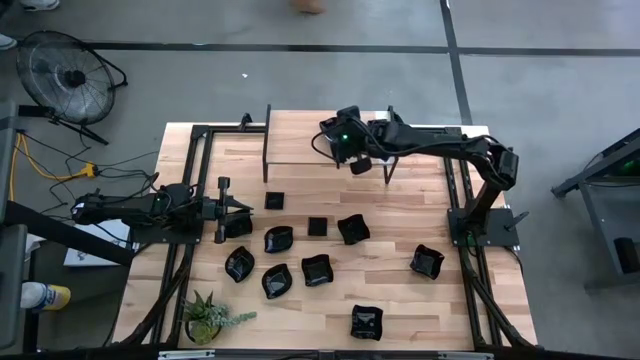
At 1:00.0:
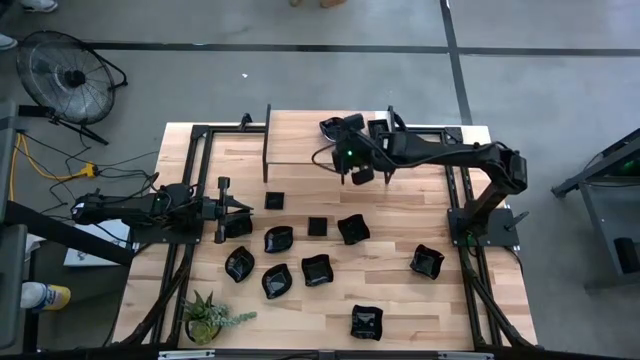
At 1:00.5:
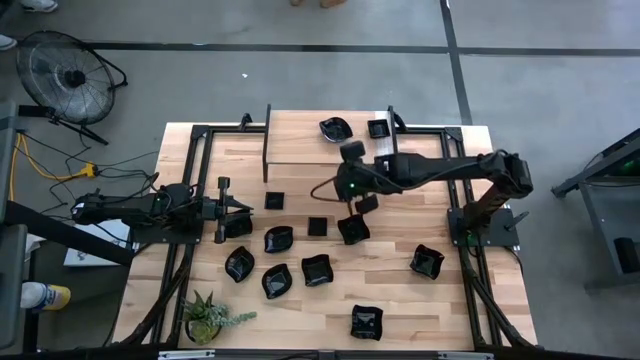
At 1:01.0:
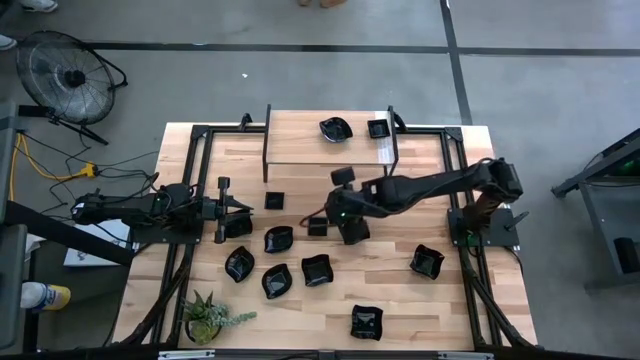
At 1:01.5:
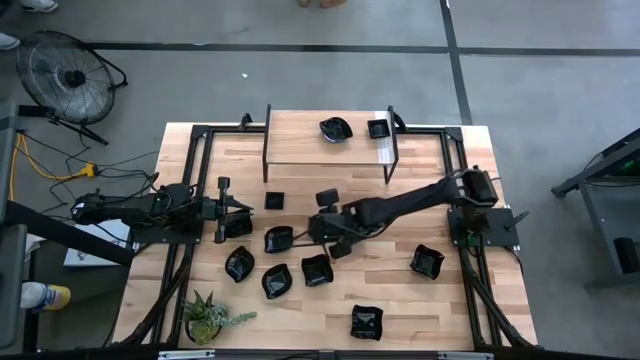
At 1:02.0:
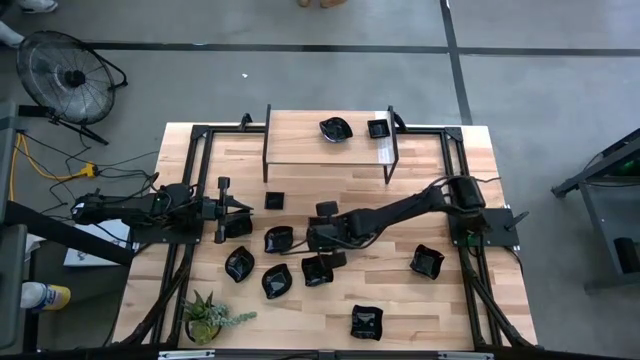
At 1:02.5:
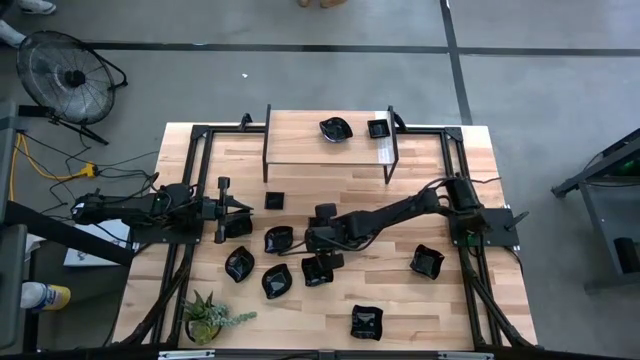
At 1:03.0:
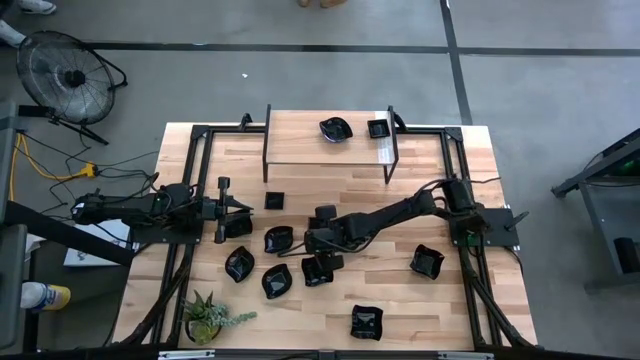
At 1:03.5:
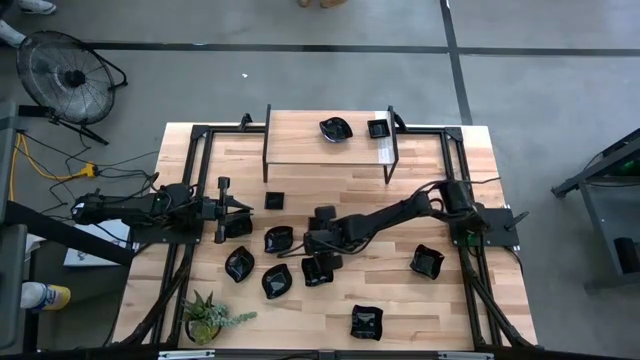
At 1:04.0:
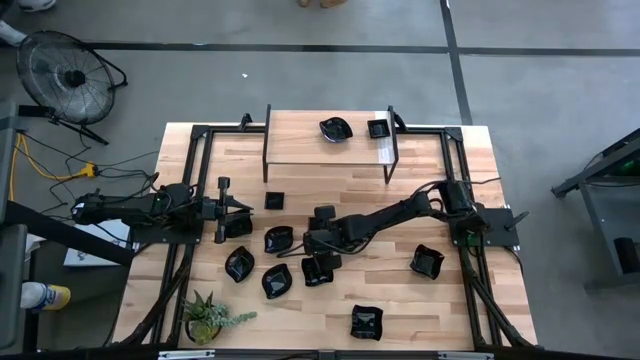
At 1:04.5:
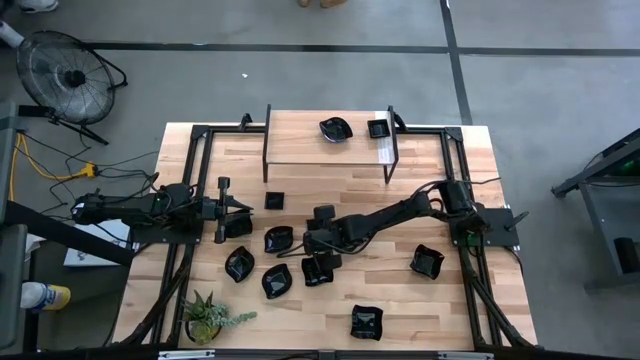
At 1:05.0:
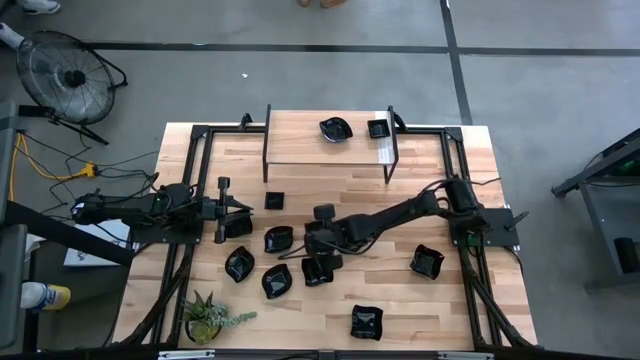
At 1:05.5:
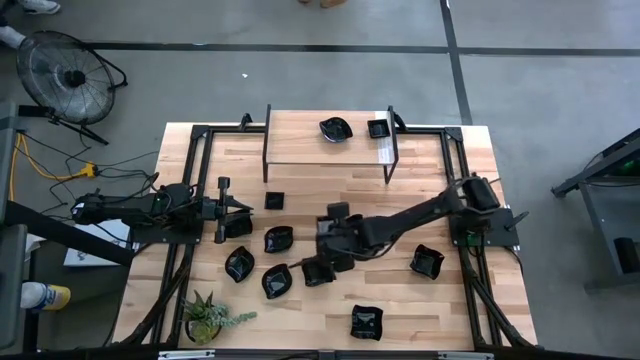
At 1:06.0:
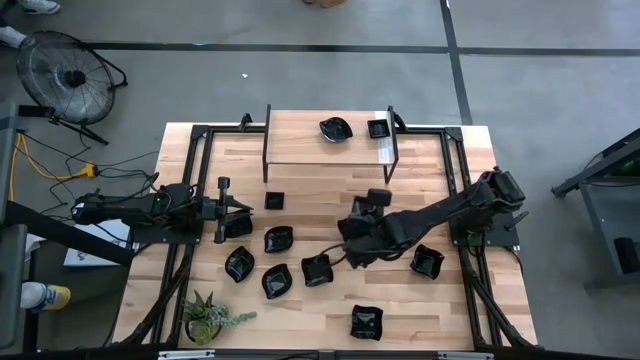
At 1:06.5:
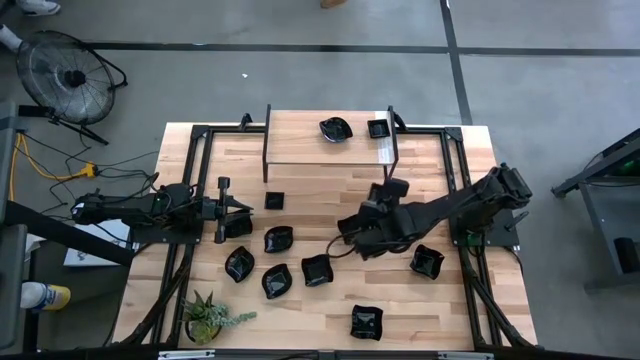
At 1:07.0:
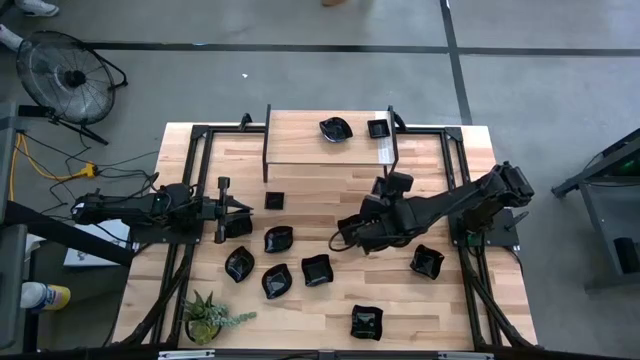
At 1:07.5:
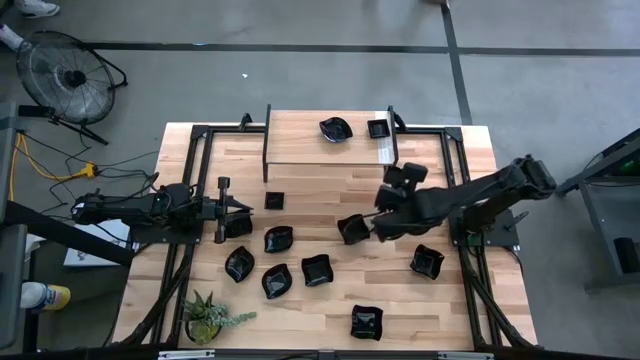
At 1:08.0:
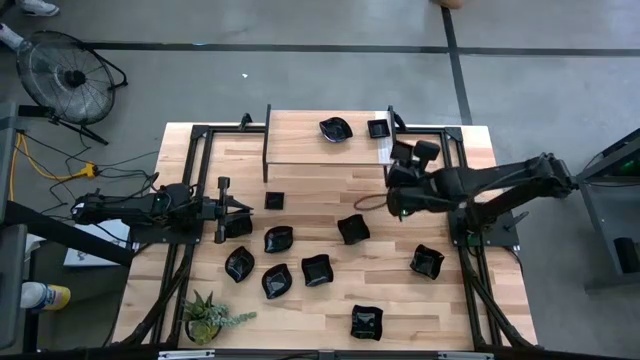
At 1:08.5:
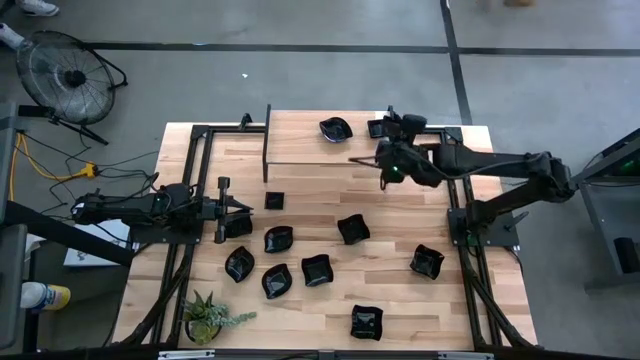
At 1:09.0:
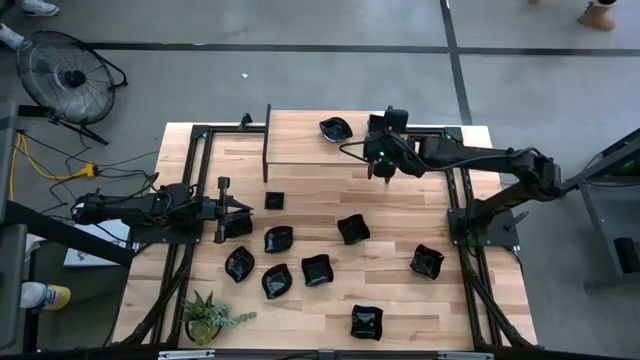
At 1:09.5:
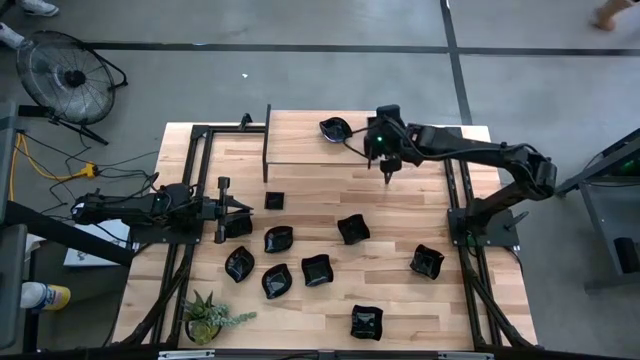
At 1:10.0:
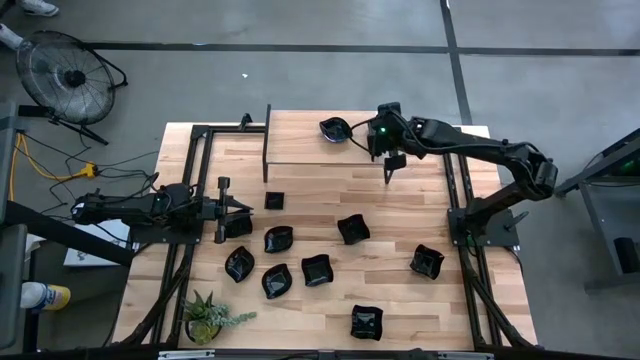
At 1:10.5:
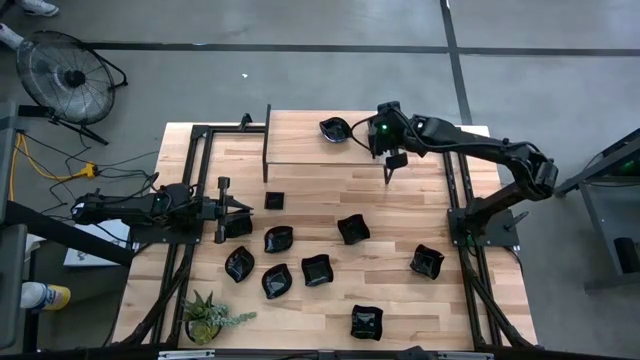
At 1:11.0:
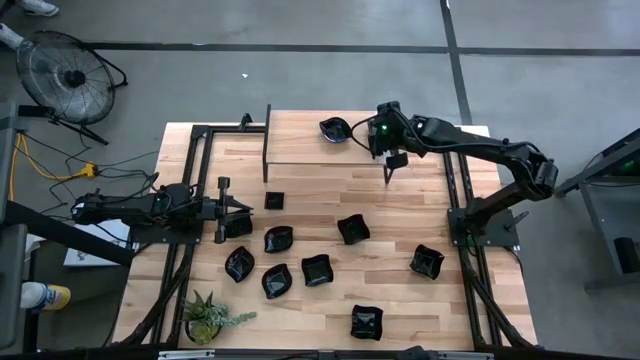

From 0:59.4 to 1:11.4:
Task: Pick & Place Mini shaped plates
Stack the black square plate on top of the black square plate on the shelf

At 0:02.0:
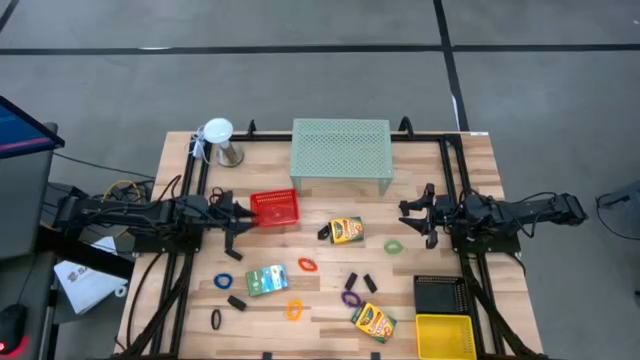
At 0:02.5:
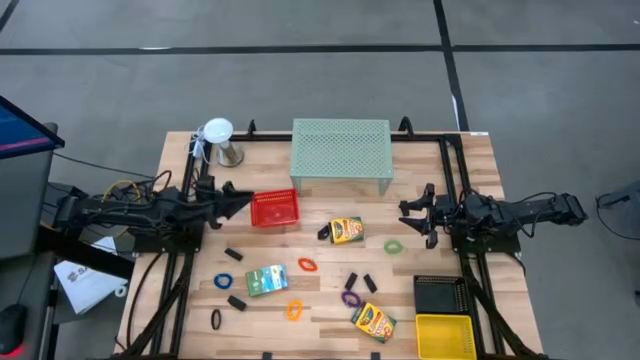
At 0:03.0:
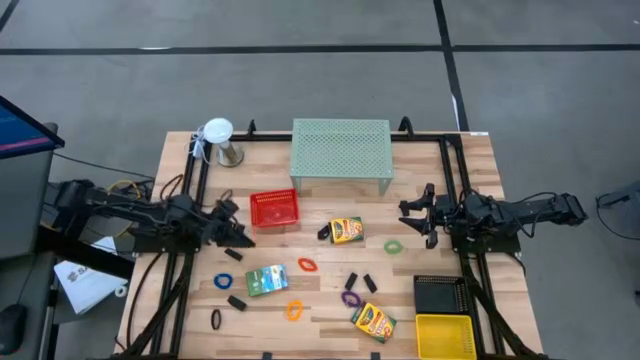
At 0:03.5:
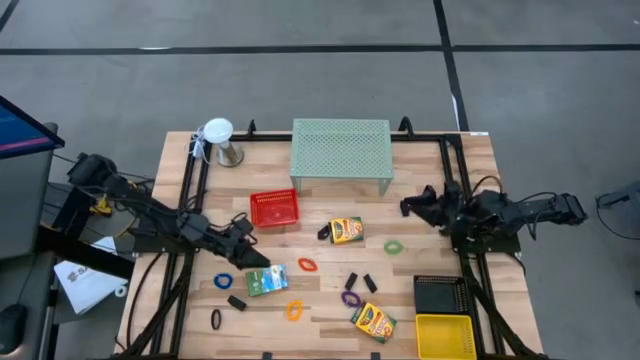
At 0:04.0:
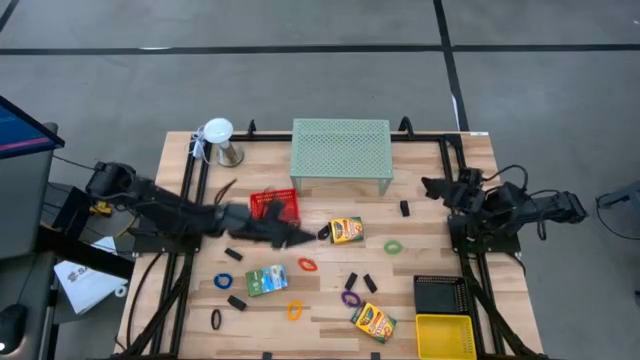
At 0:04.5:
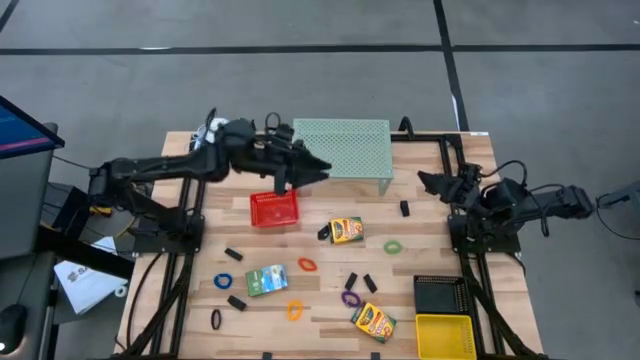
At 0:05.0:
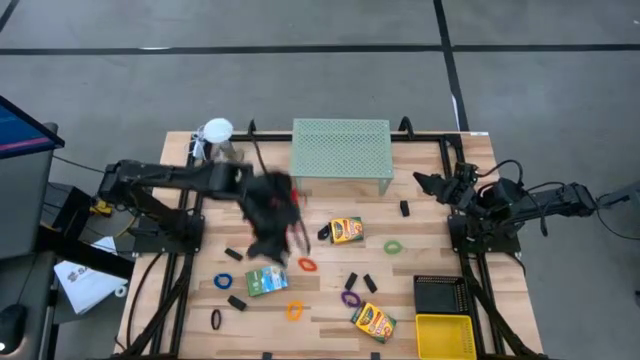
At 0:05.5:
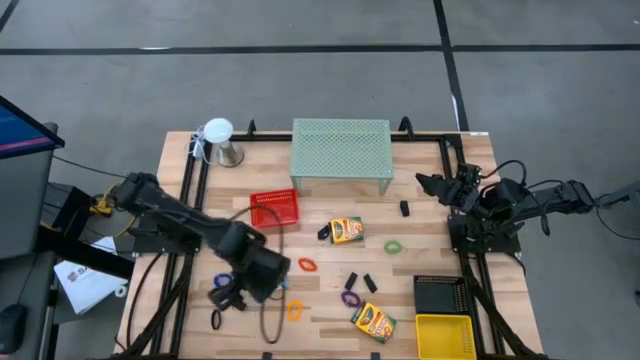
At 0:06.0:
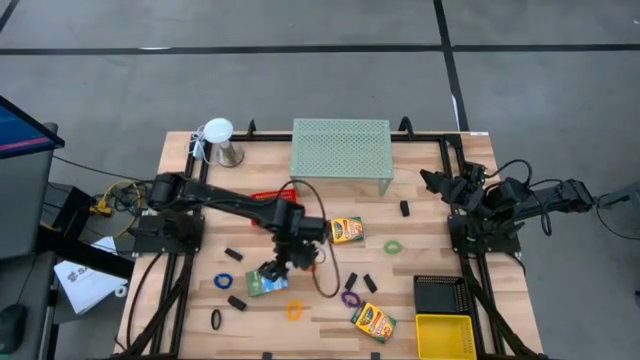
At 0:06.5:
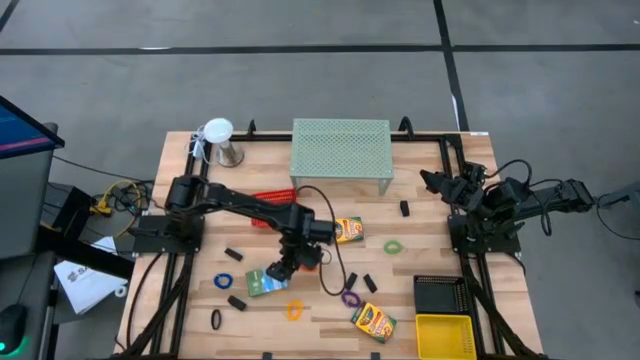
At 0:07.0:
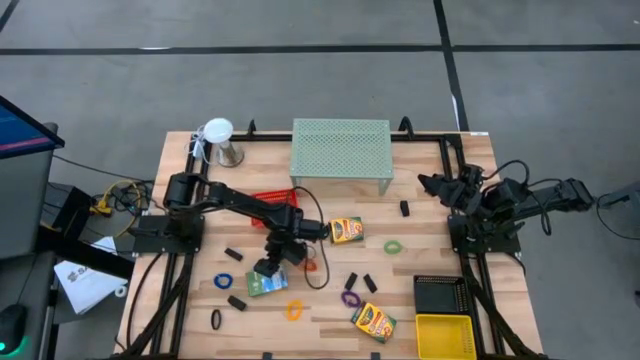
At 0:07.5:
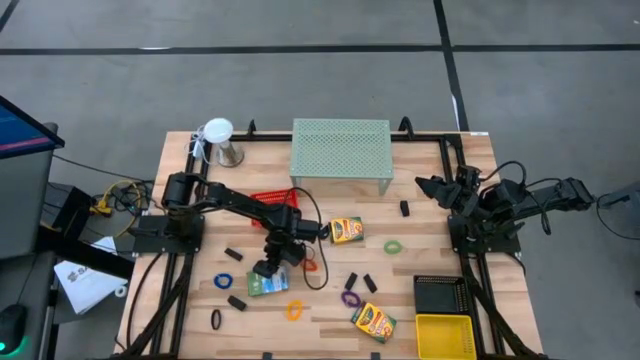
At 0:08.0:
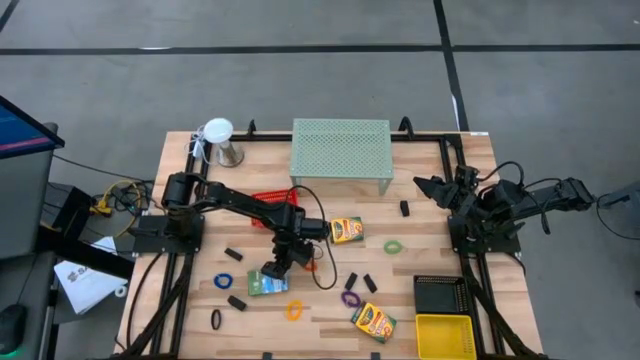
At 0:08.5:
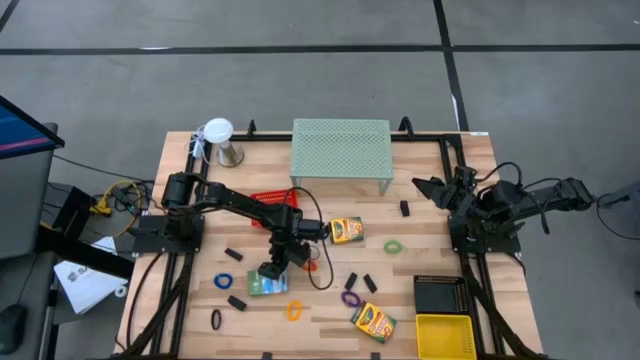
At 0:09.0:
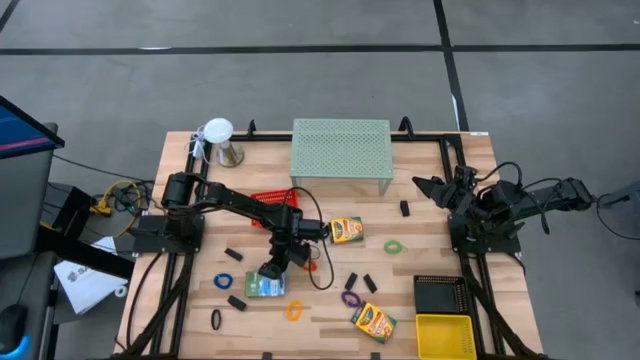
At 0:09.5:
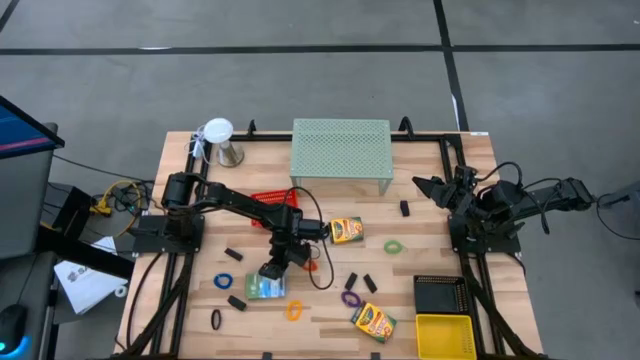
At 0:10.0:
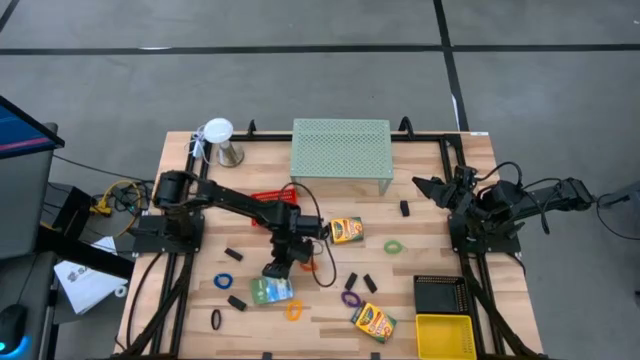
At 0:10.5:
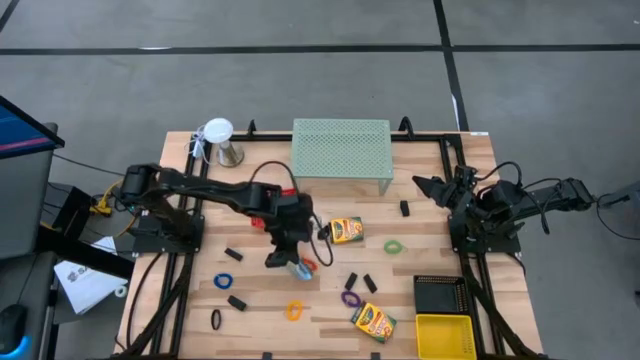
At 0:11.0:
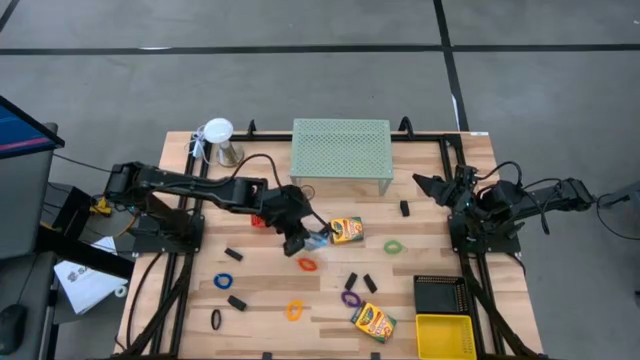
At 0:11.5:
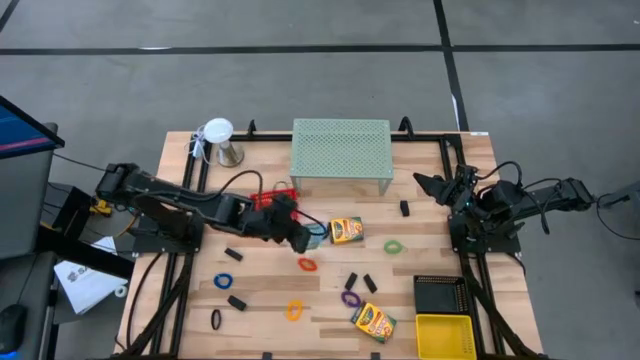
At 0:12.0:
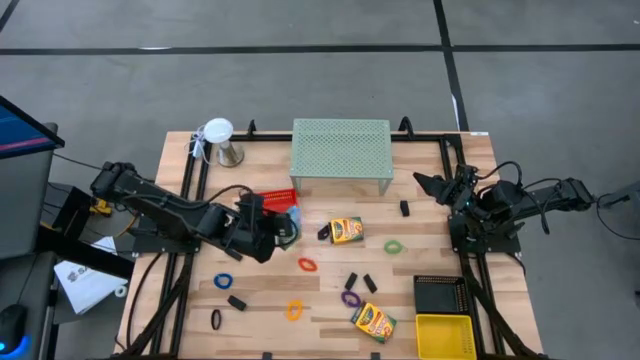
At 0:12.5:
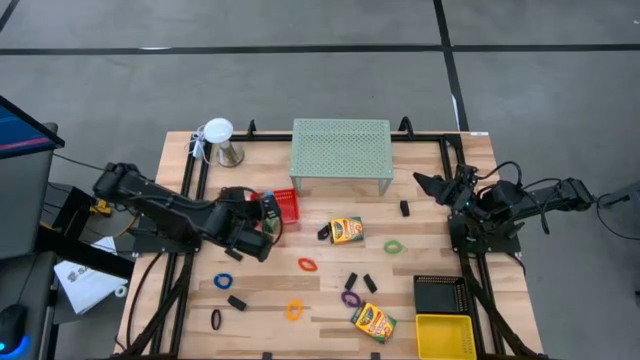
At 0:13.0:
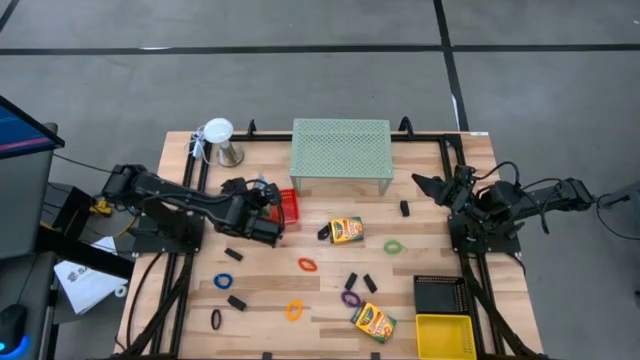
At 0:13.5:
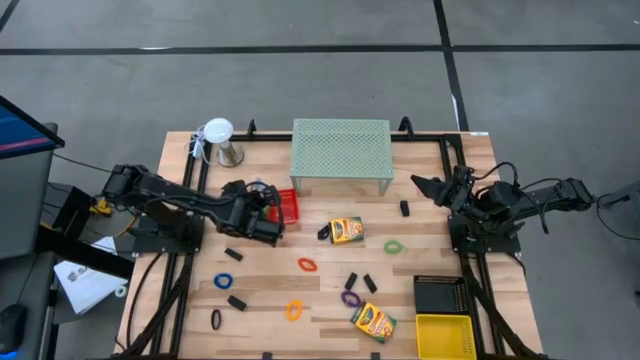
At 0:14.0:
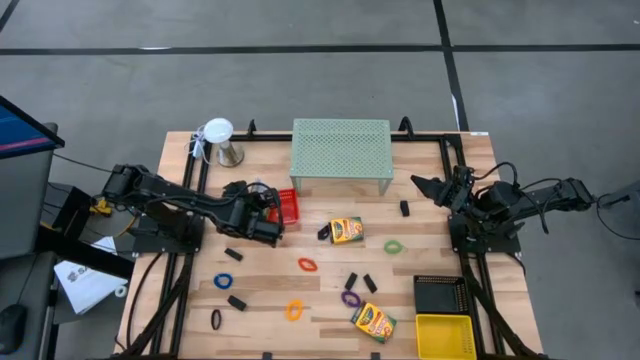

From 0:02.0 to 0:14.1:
Task: Pick & Place Office Desk Supplies
Put the yellow crayon box into the red bin
